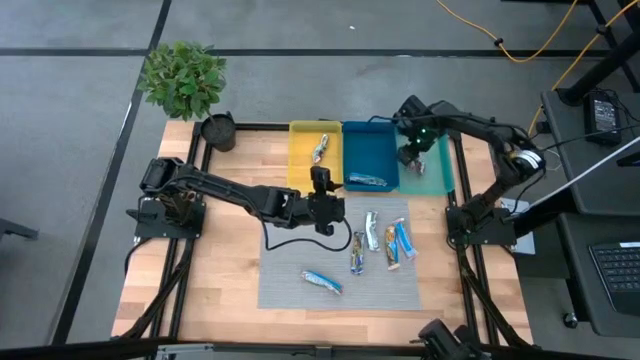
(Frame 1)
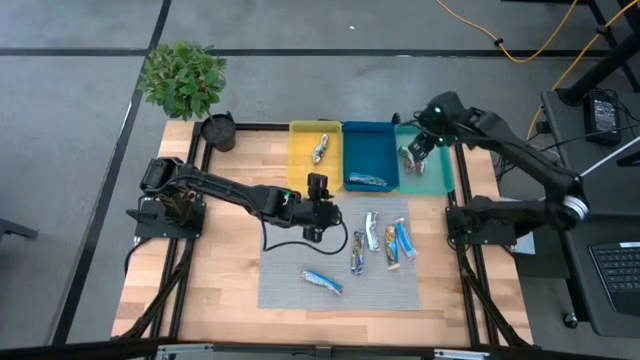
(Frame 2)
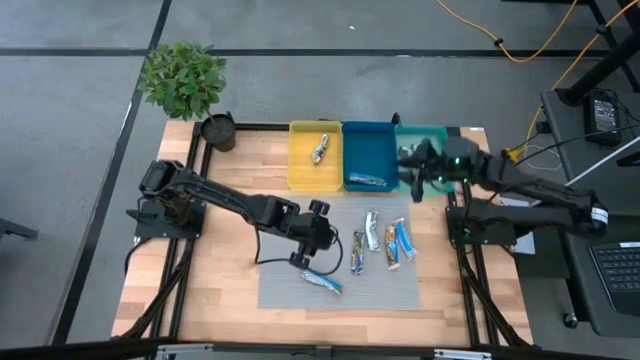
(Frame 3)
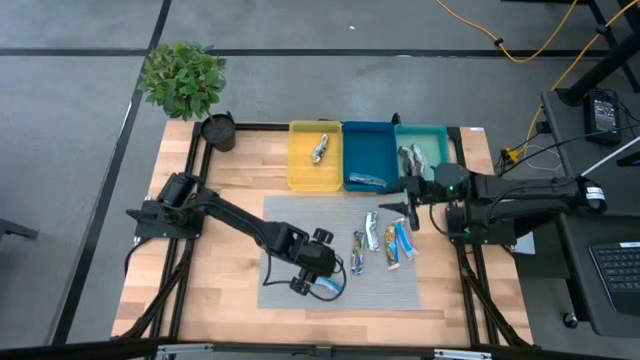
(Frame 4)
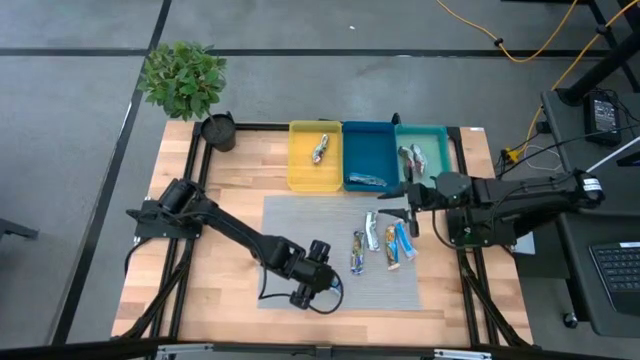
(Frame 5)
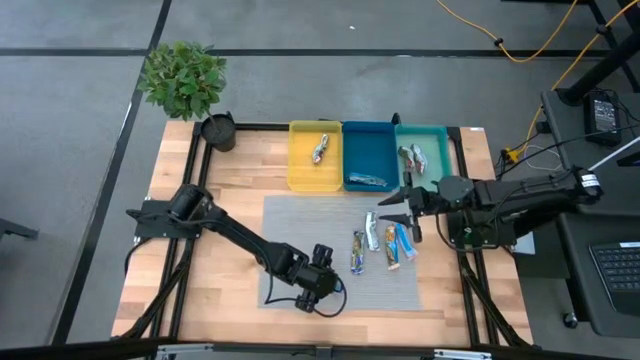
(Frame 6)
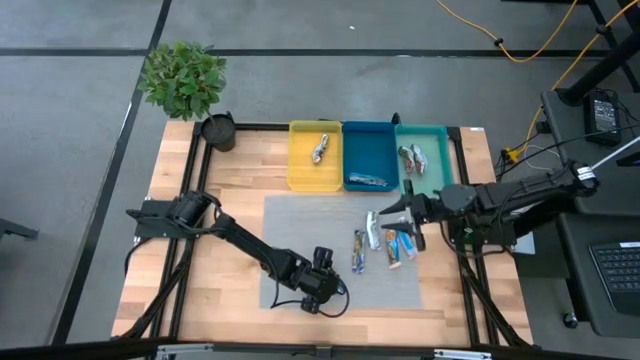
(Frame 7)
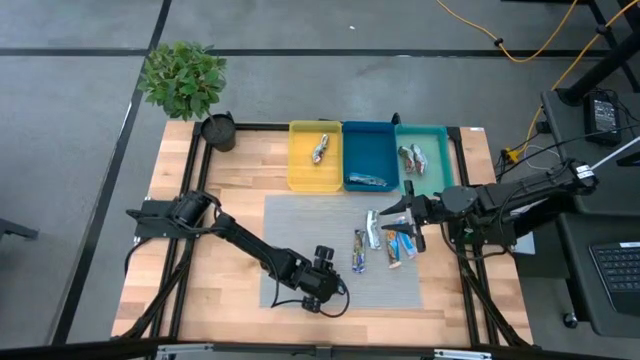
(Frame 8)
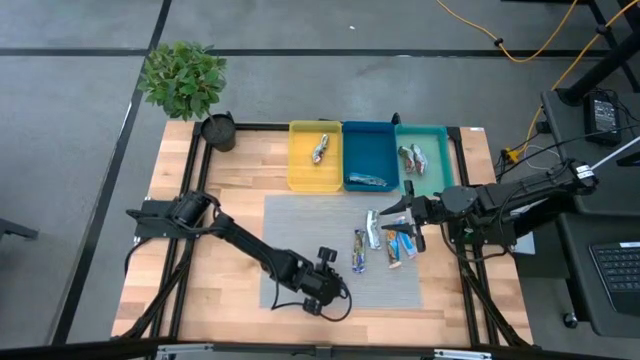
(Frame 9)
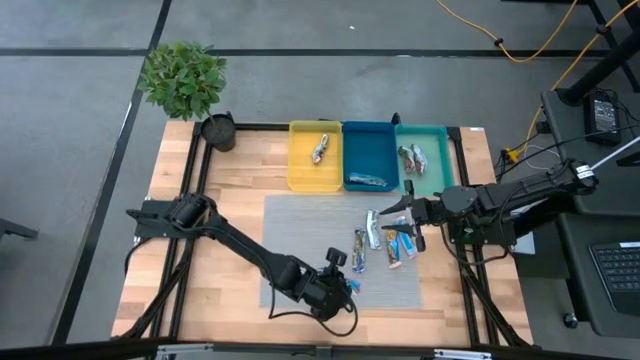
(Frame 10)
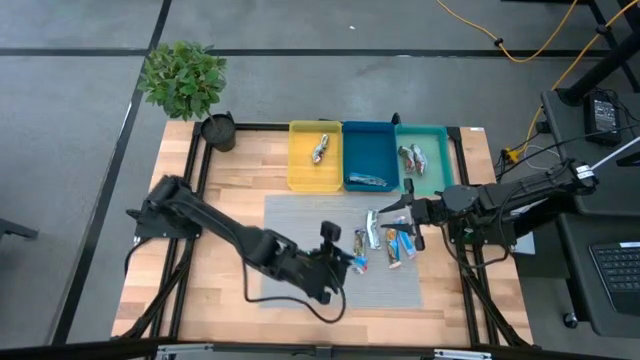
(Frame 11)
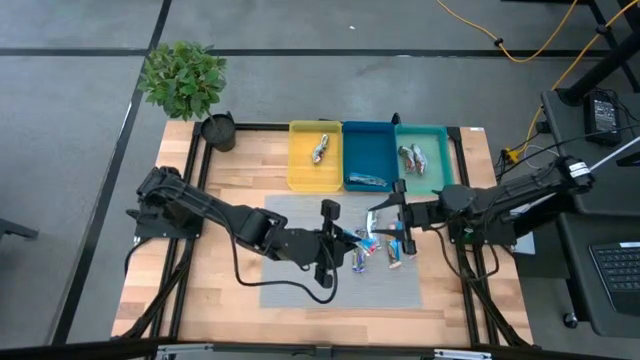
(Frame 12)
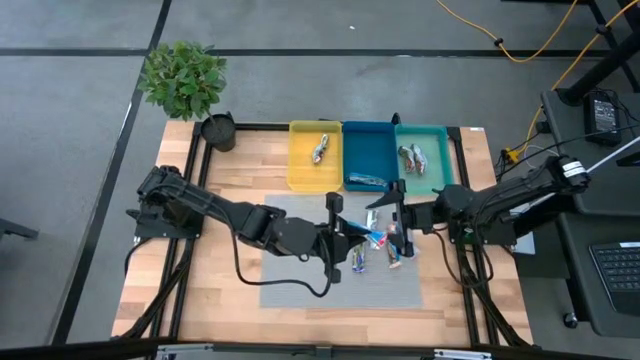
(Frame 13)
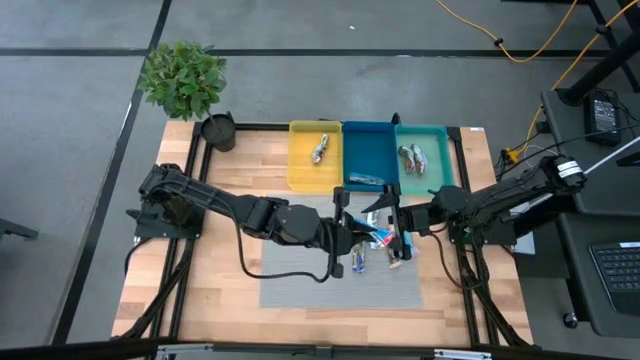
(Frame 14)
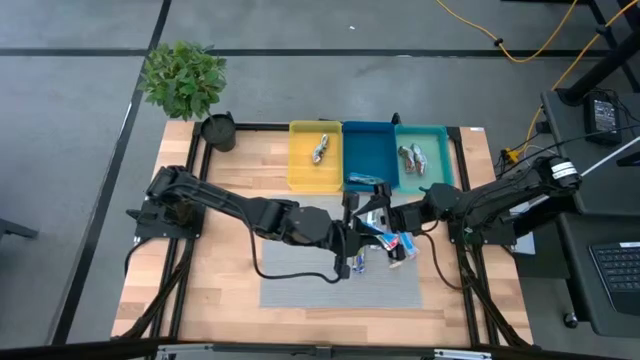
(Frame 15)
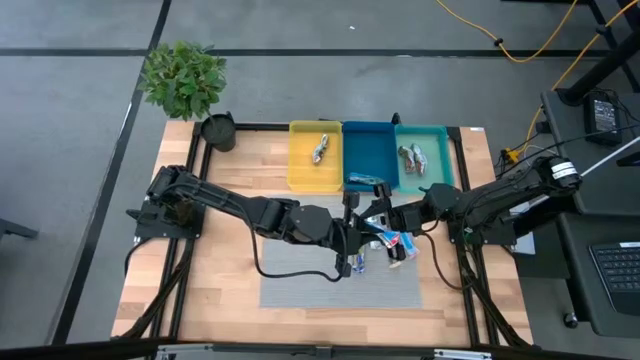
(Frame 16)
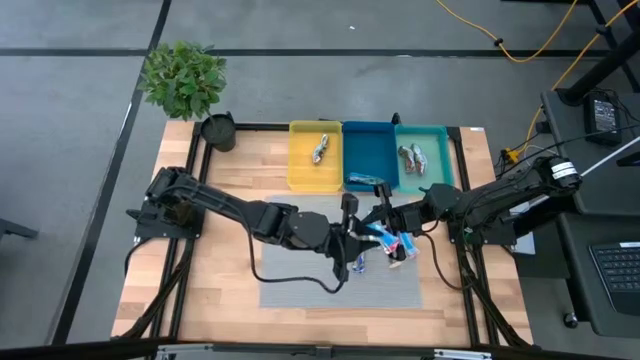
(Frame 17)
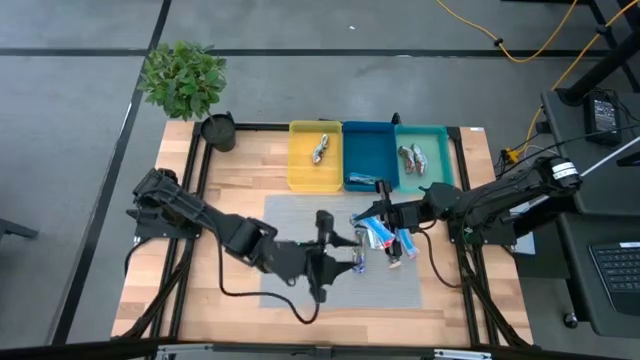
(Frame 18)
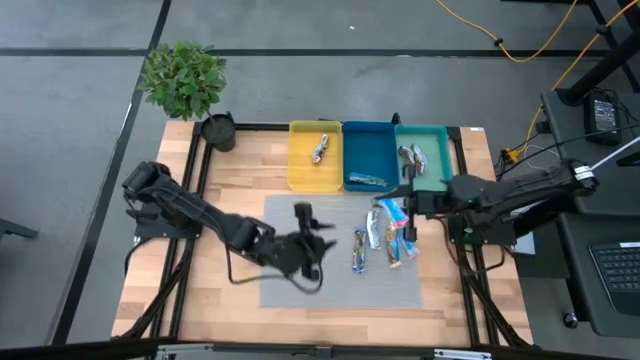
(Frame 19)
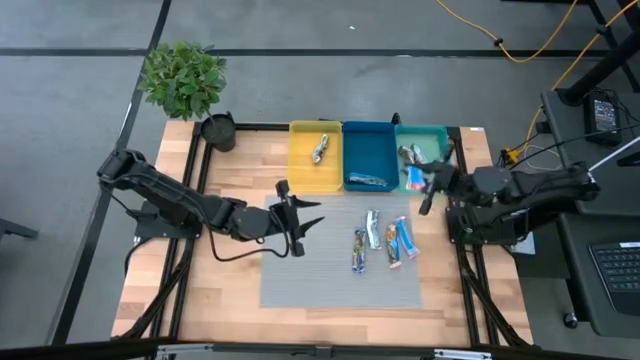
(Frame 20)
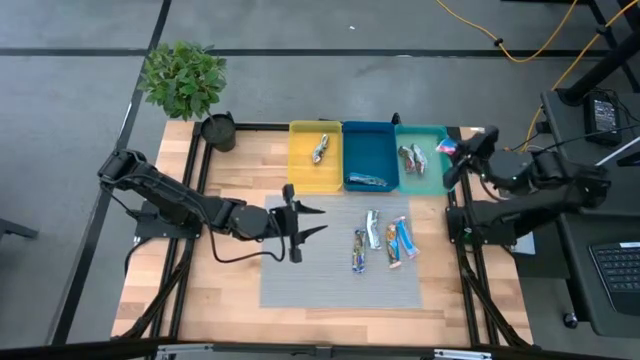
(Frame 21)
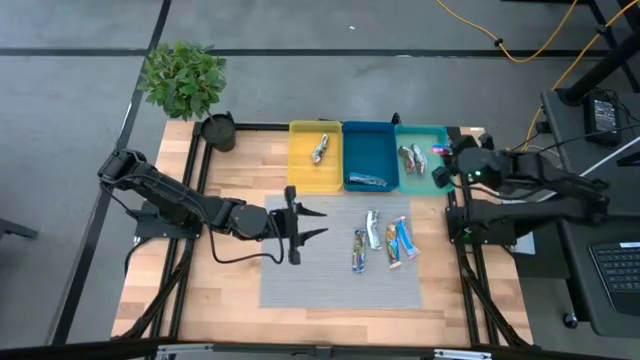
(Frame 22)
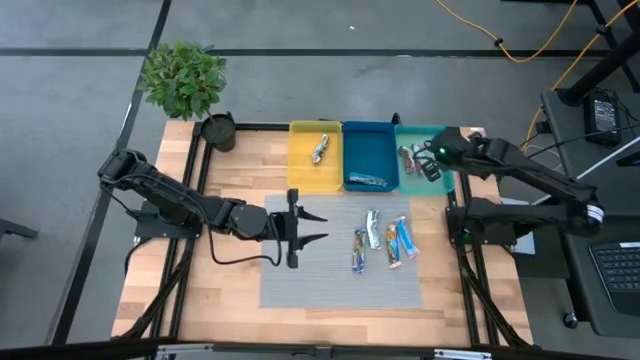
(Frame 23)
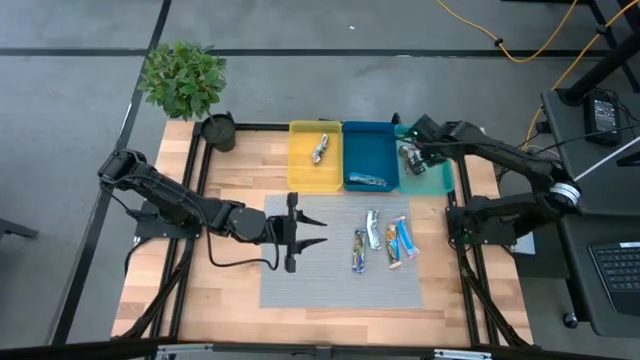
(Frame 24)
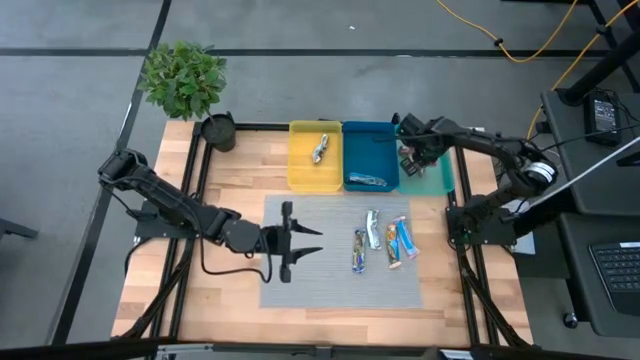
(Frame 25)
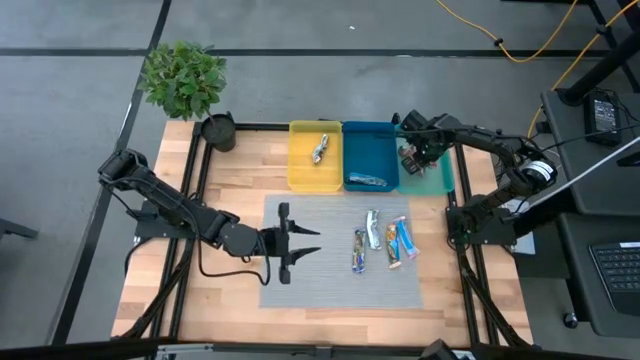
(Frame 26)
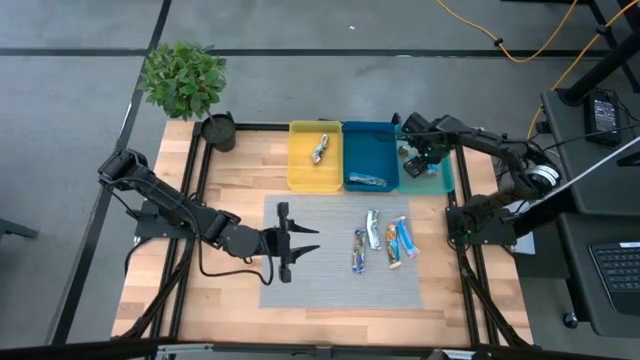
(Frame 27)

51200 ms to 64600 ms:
Task: Pick and place Granola Bars by type
Put the bottom red granola bar into the light blue bin

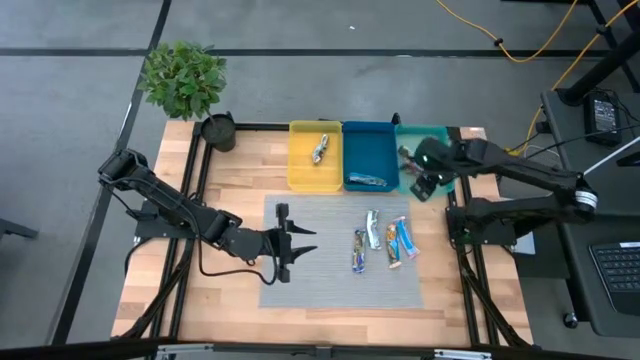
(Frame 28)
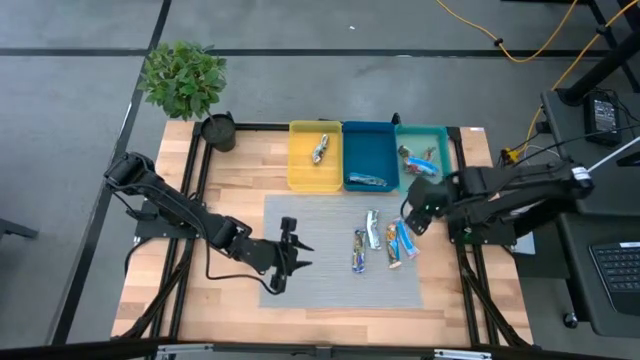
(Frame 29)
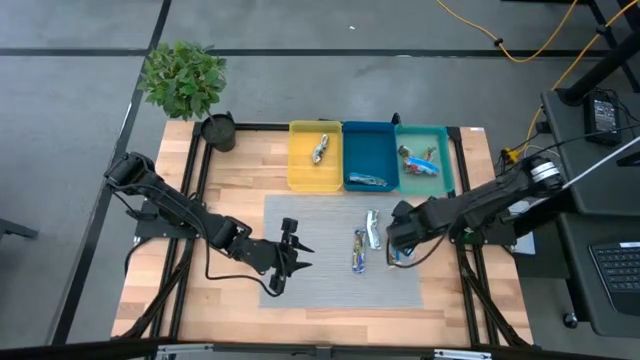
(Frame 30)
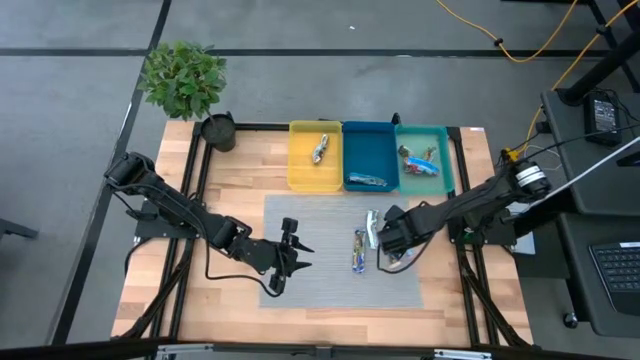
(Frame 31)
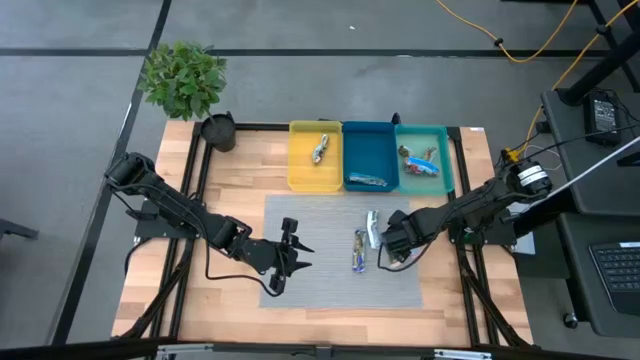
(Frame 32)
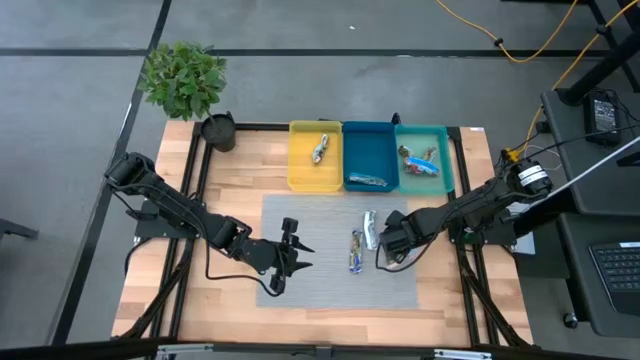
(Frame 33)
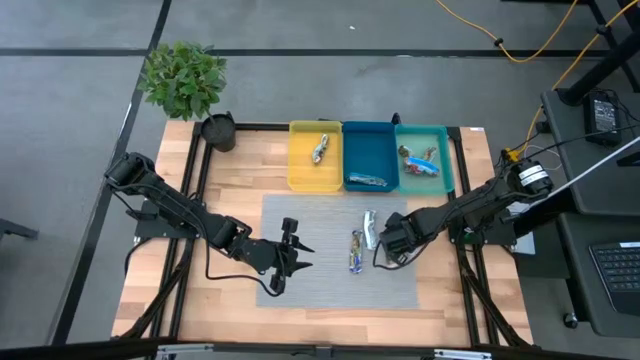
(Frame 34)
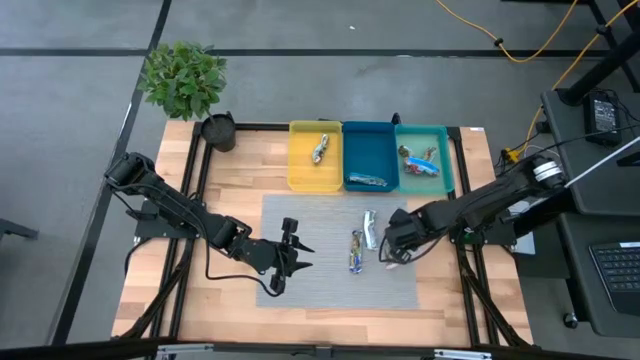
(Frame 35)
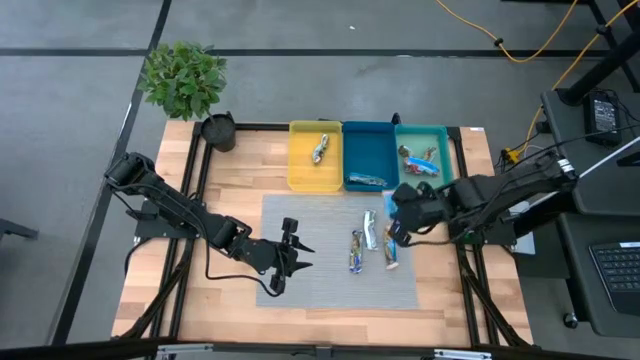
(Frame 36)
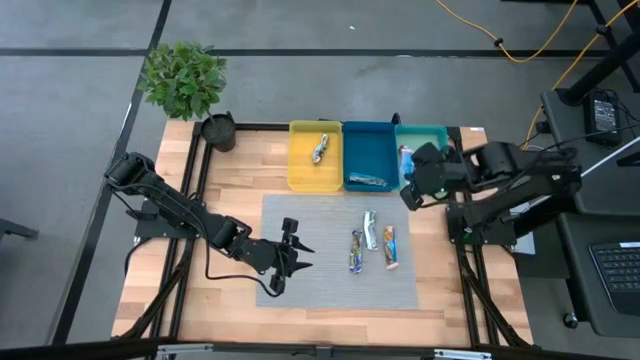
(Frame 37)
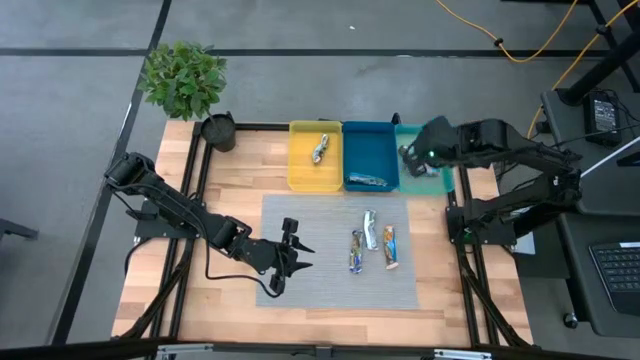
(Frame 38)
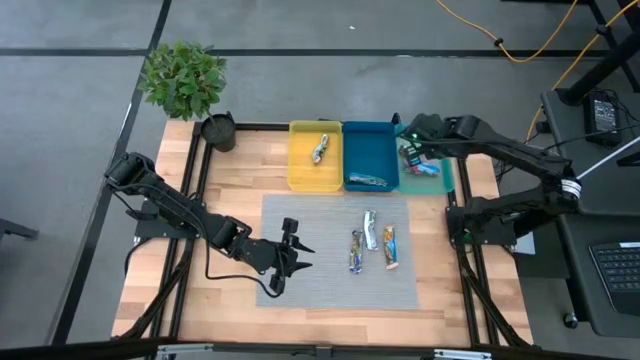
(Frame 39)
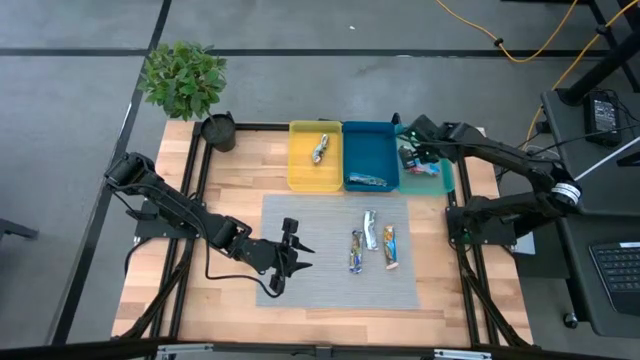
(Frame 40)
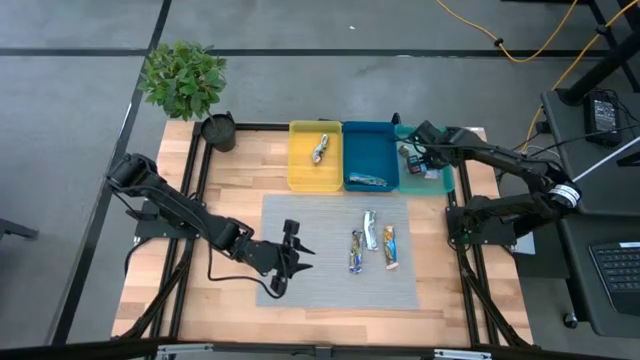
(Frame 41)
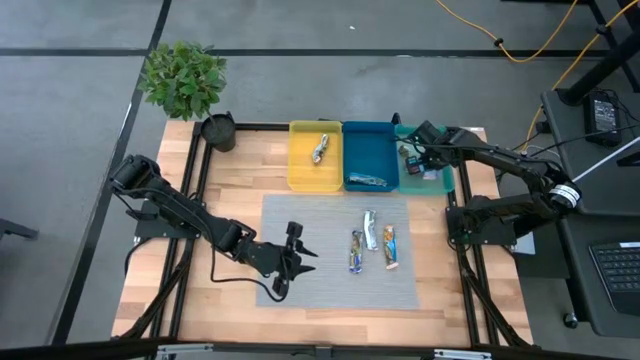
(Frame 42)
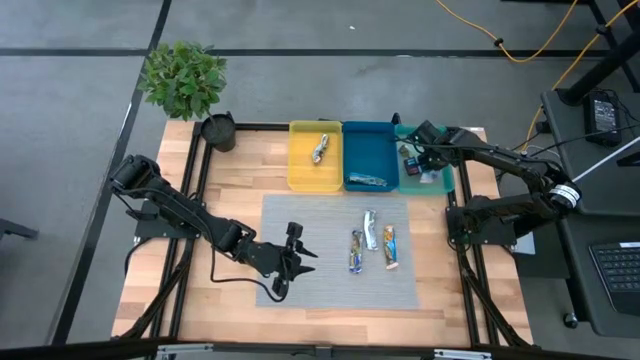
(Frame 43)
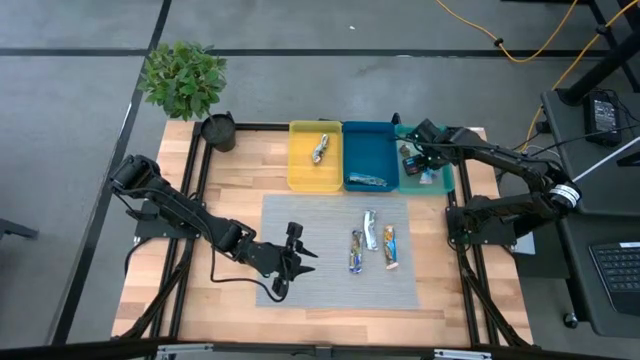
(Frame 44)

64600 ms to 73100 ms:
Put the red granola bar into the light blue bin

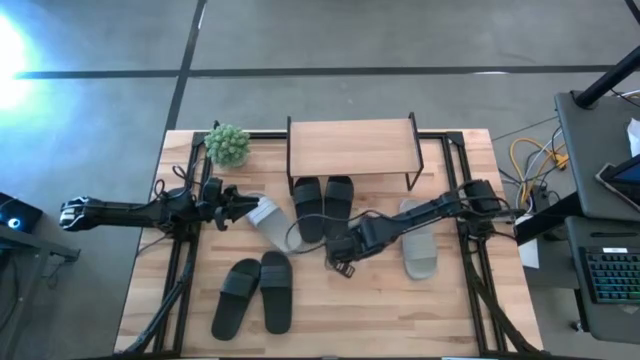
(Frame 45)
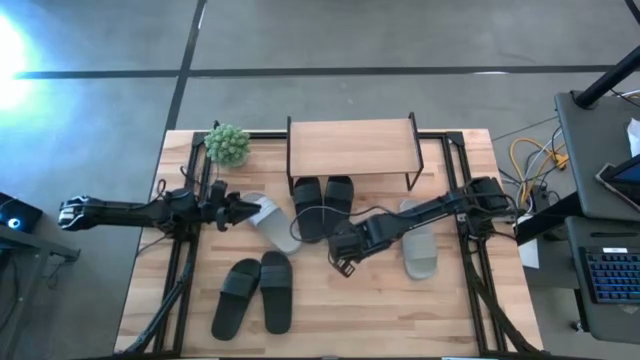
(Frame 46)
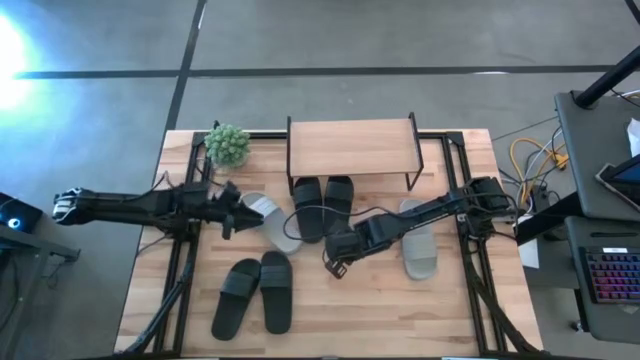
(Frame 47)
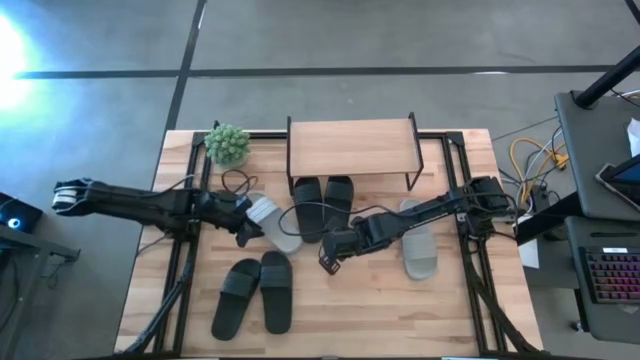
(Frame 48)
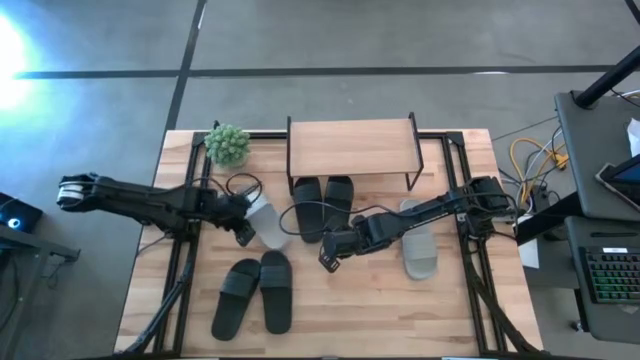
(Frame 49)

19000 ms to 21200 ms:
Task: Pick and place slides into the shelf
Adjust the white slide
